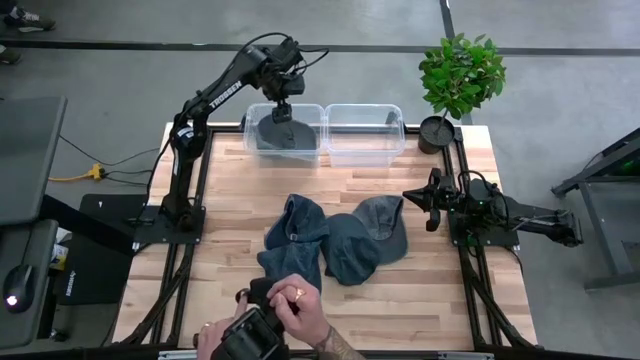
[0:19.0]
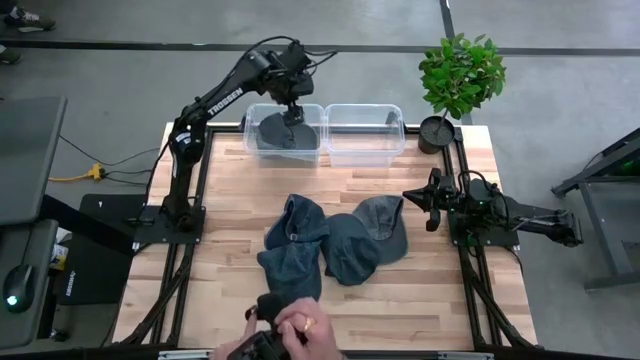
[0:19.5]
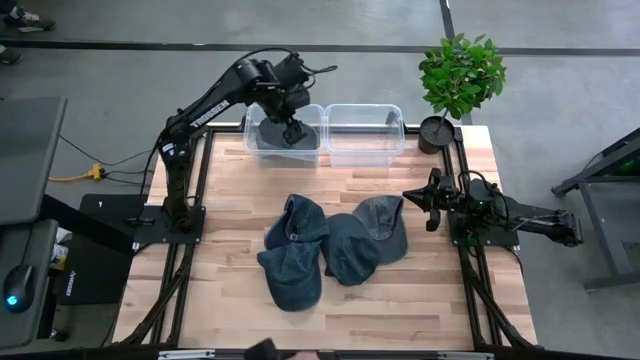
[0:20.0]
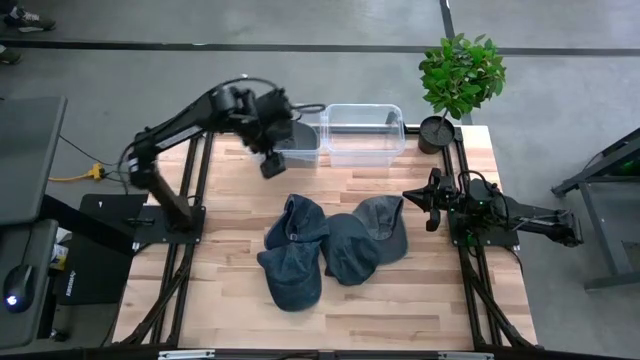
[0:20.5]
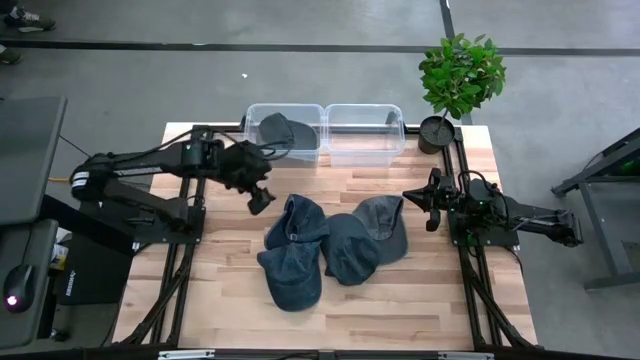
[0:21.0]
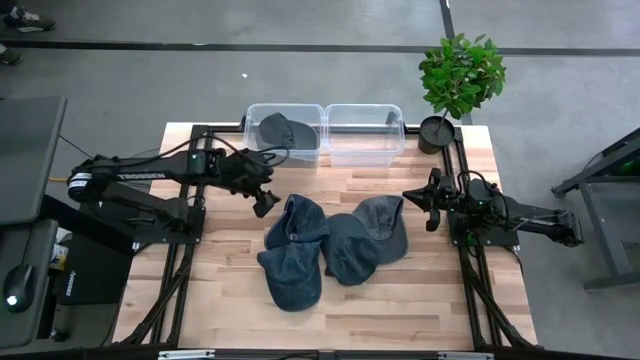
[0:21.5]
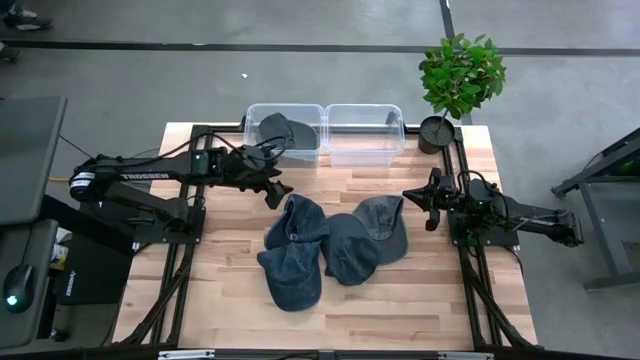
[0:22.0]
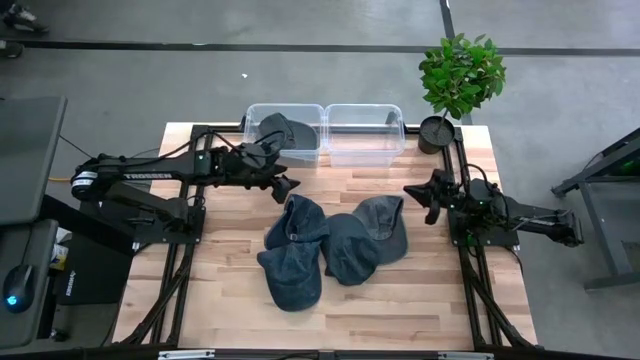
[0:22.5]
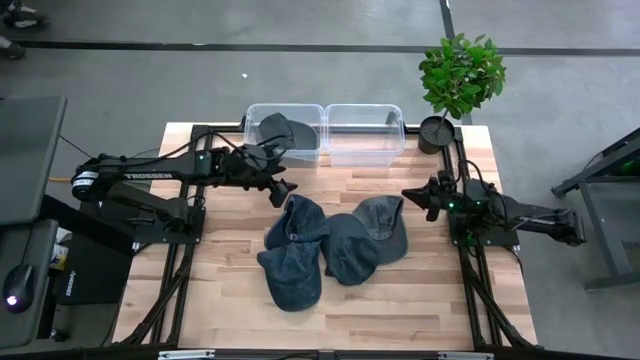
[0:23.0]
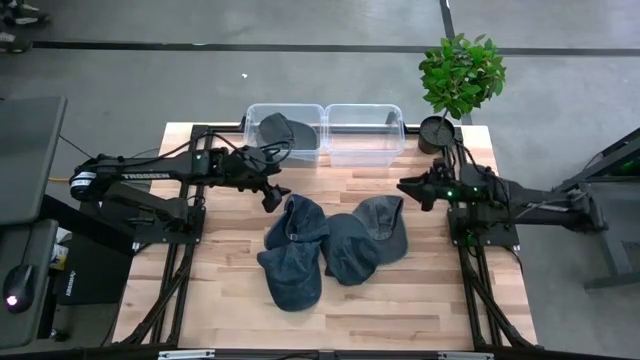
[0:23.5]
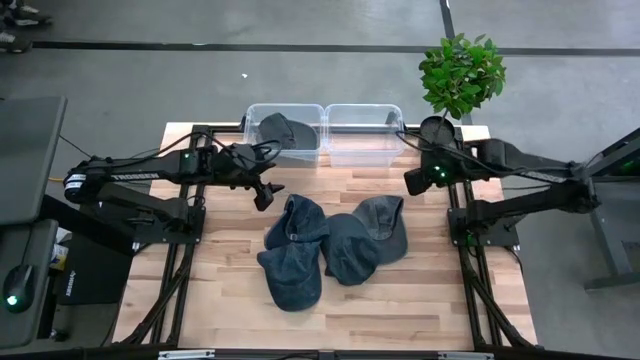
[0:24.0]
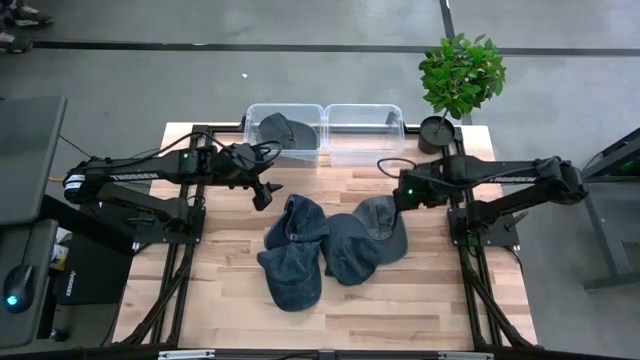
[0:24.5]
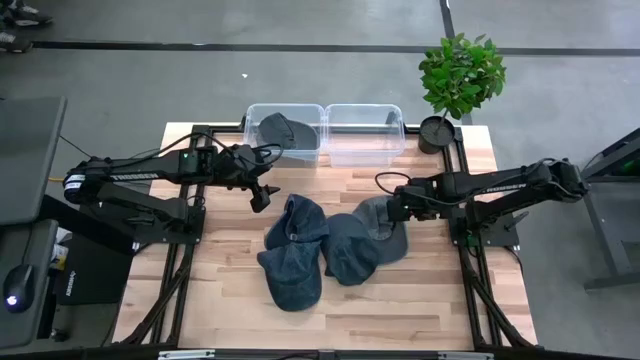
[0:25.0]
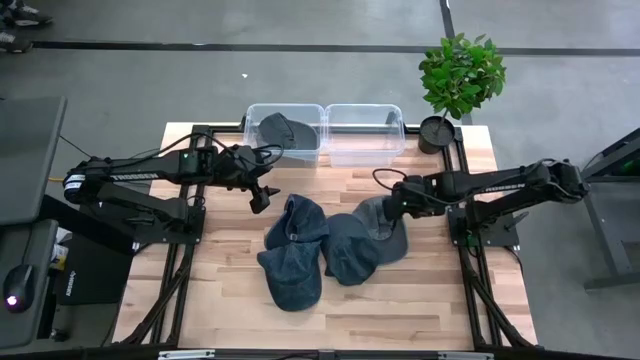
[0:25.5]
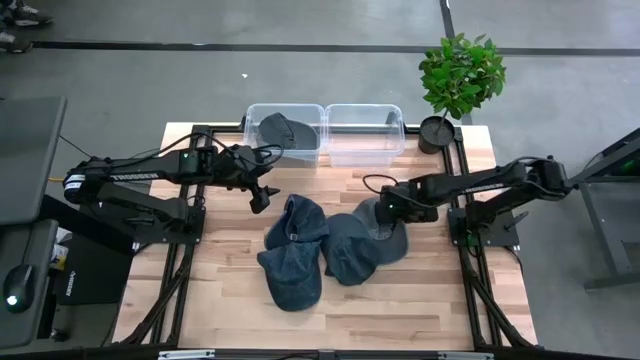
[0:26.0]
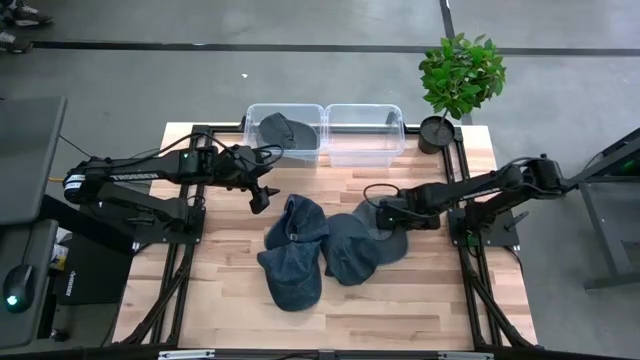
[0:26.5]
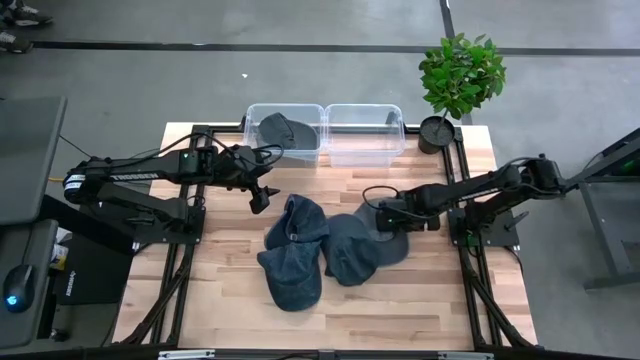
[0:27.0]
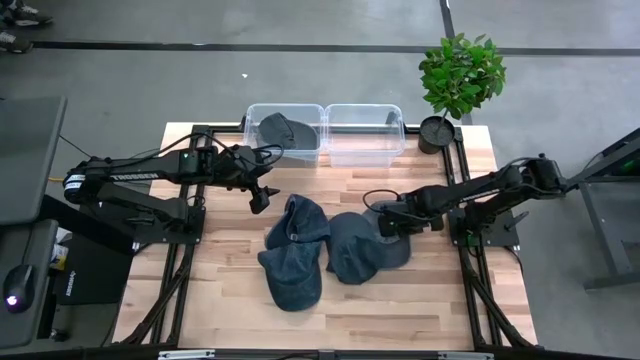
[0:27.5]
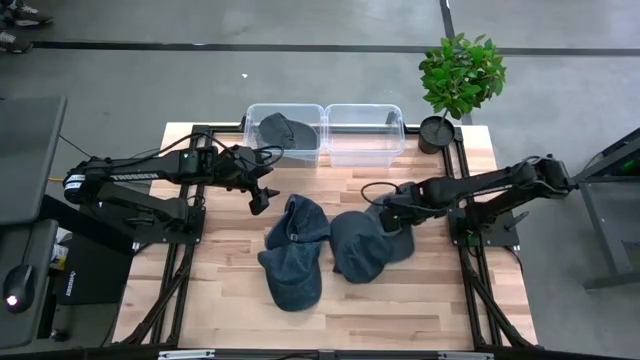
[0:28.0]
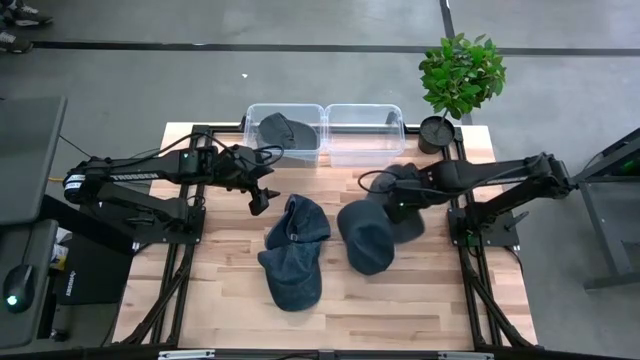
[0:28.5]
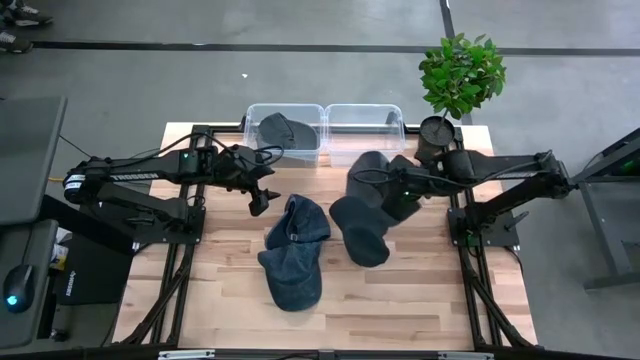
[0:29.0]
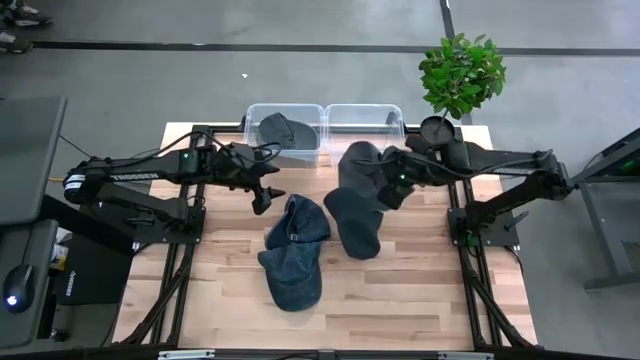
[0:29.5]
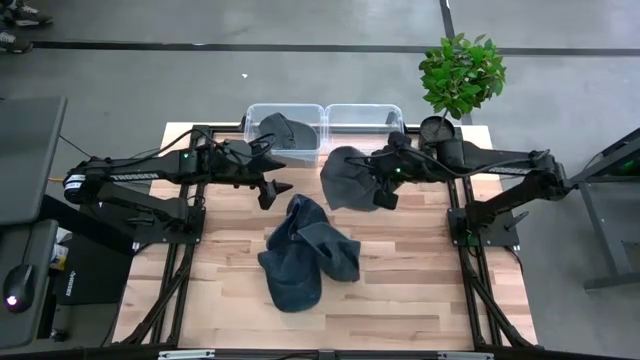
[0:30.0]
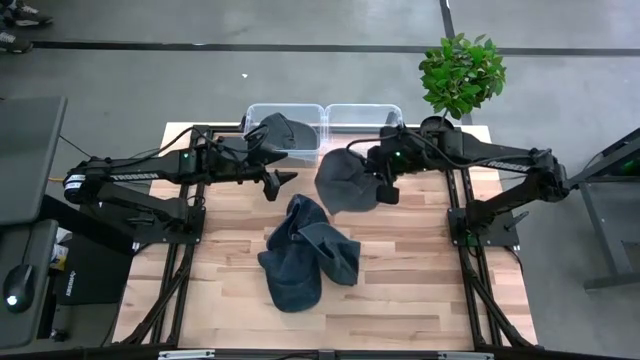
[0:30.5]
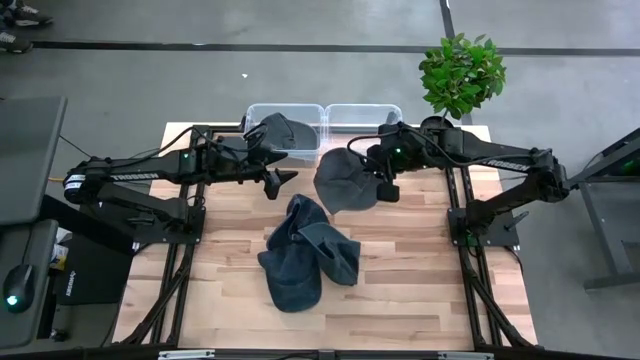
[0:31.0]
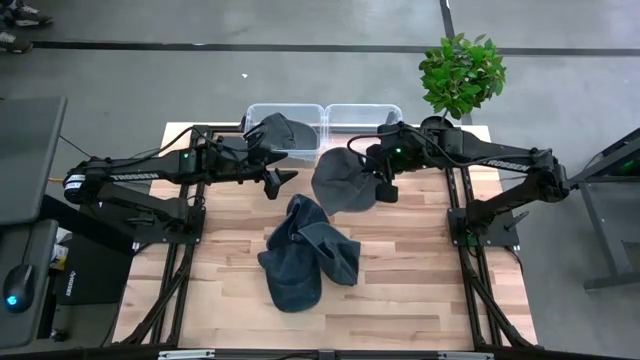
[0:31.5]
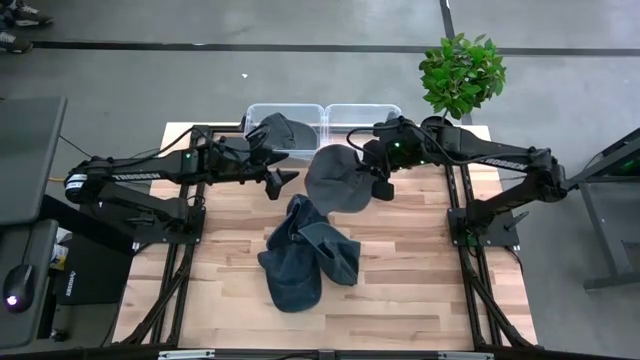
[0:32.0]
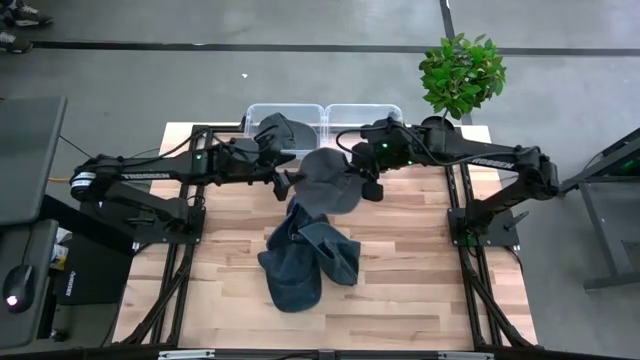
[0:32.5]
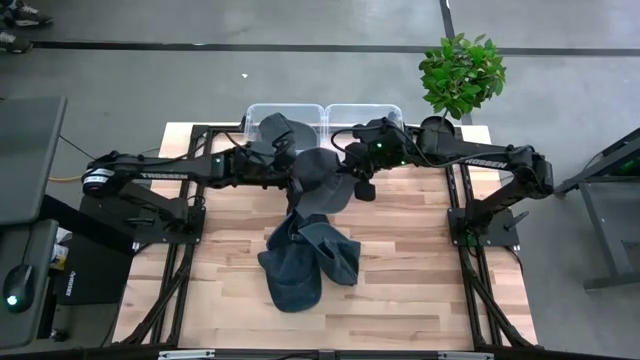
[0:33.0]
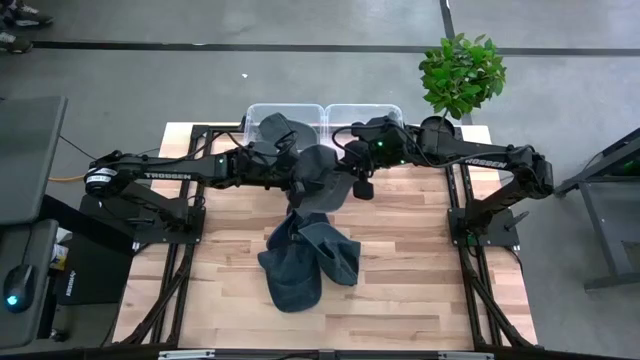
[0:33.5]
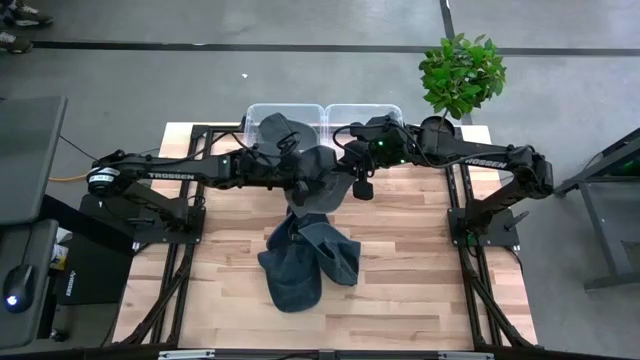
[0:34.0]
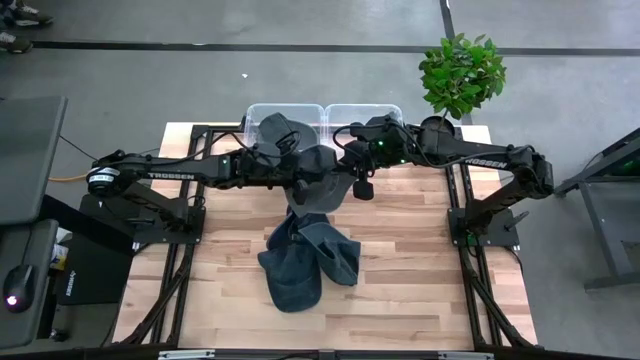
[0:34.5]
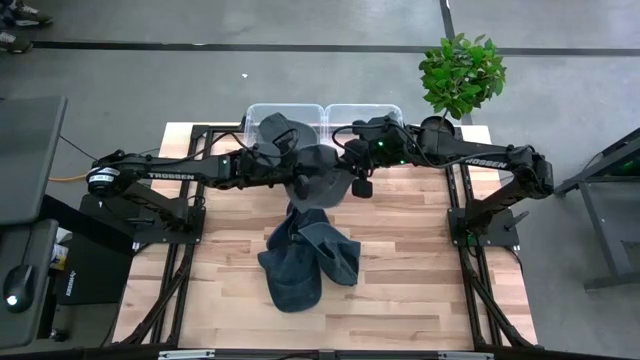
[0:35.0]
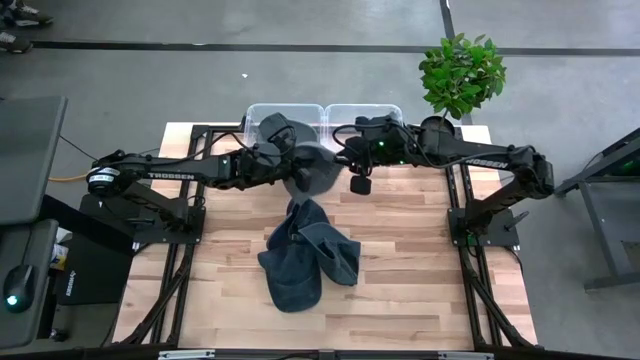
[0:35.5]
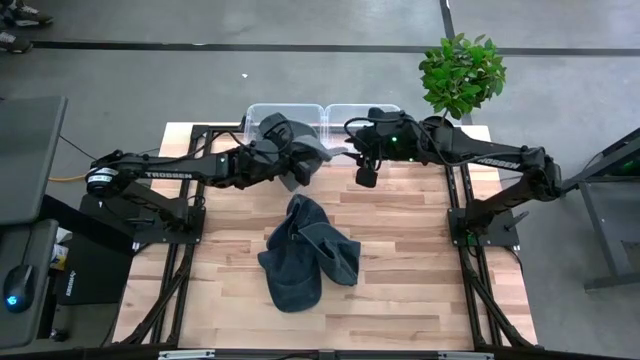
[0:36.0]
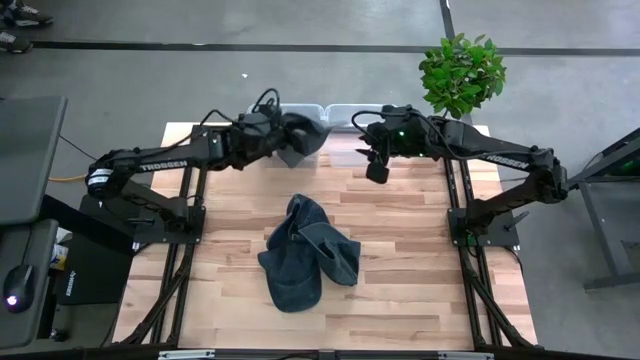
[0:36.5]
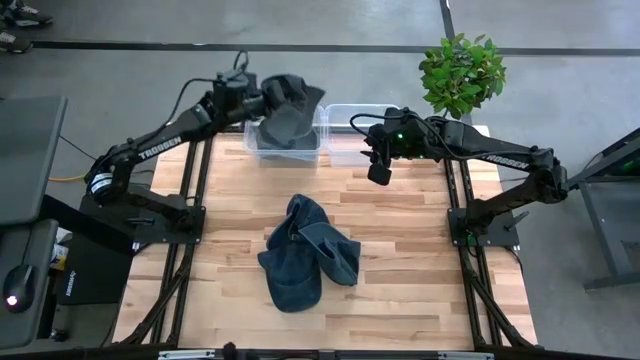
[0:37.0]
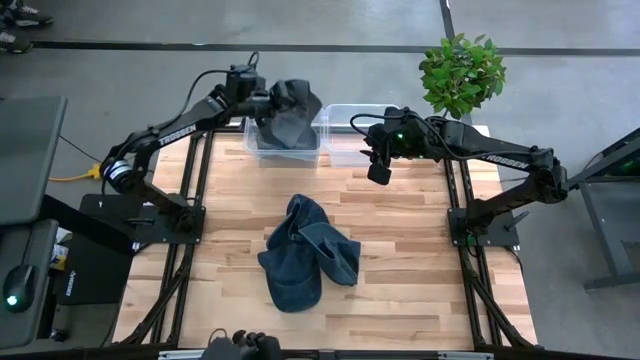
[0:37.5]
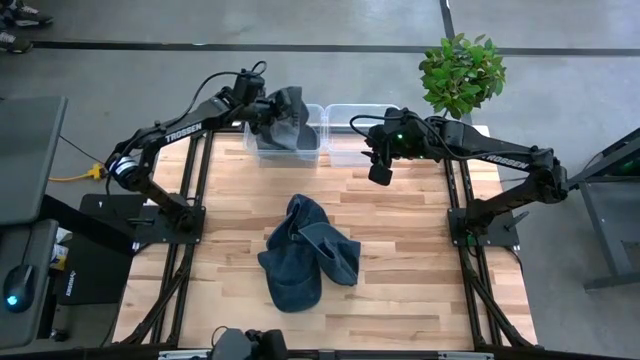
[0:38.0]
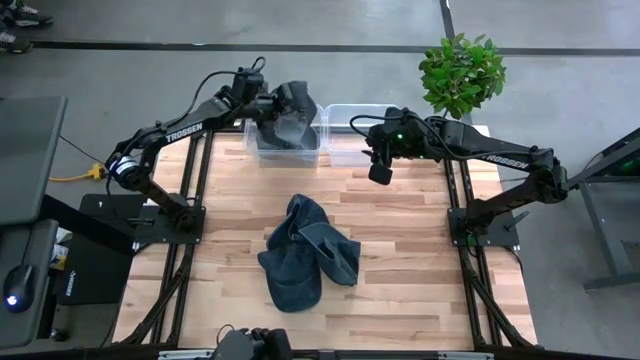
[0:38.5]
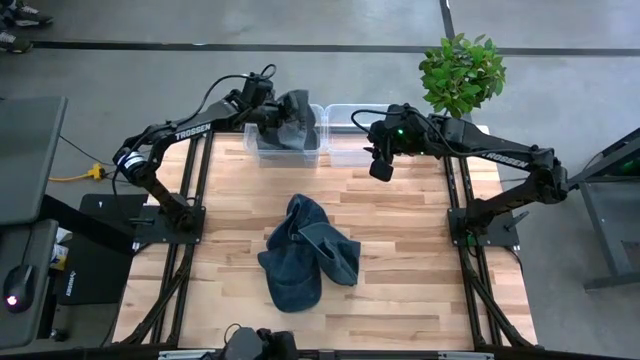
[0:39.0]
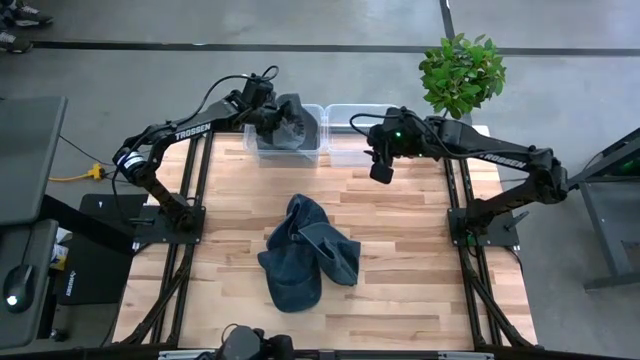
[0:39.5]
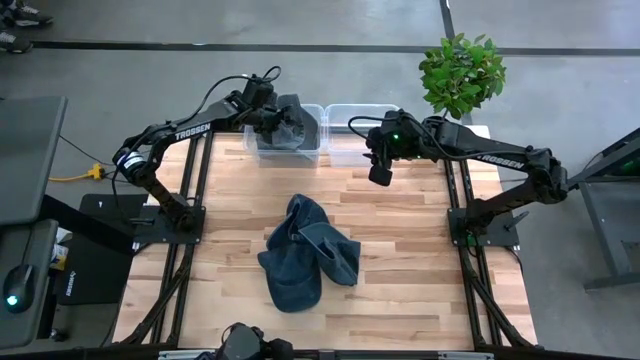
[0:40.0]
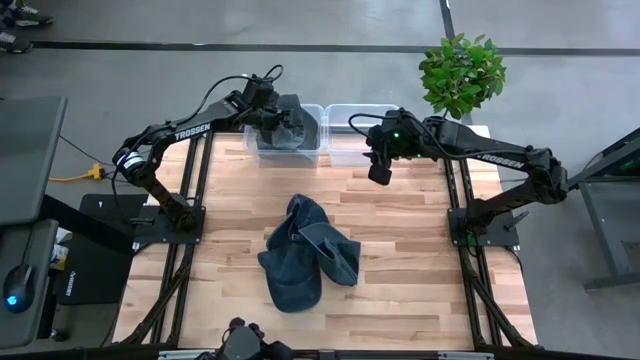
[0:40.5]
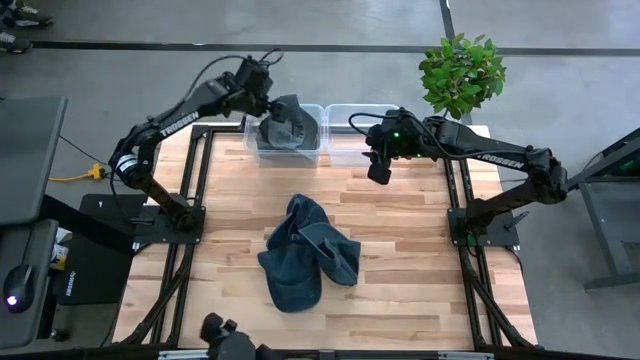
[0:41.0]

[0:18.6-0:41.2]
Task: Pick and place caps into container
Put the gray cap into the left transparent container
